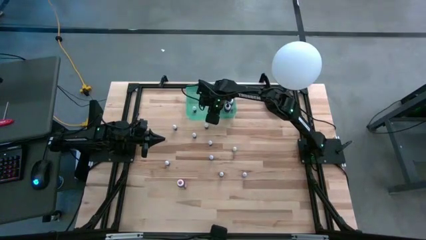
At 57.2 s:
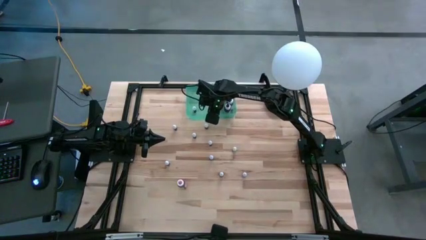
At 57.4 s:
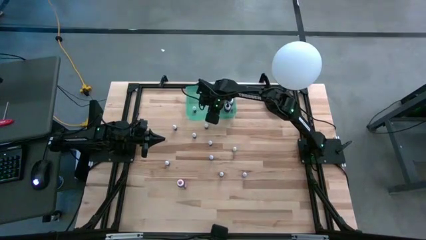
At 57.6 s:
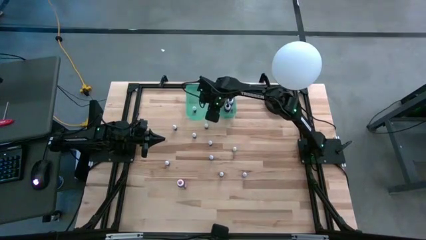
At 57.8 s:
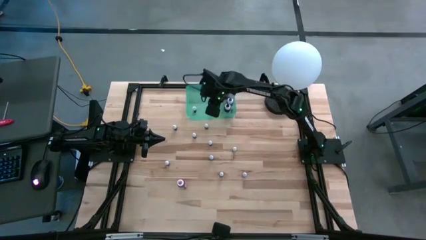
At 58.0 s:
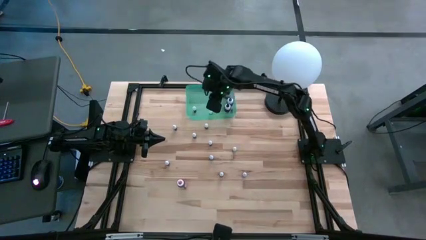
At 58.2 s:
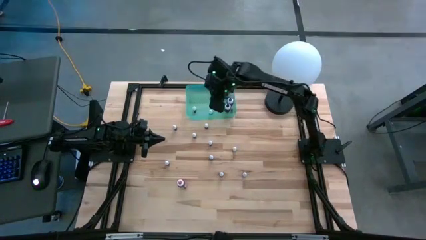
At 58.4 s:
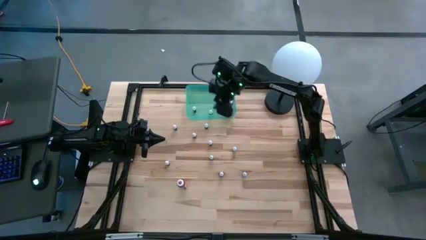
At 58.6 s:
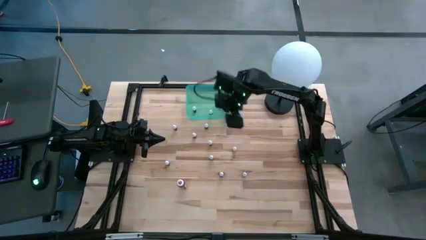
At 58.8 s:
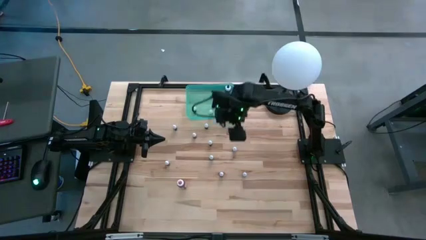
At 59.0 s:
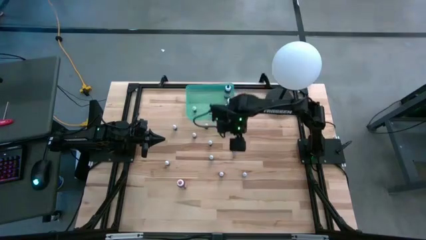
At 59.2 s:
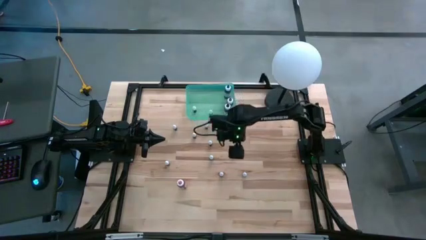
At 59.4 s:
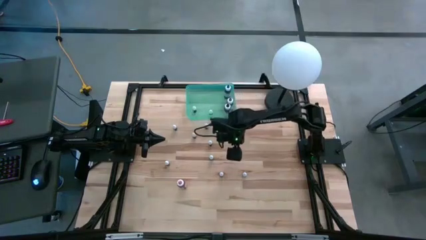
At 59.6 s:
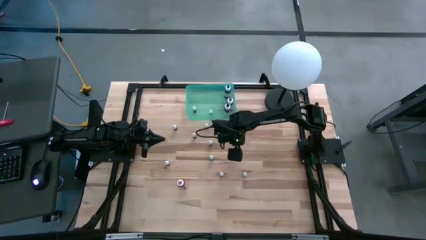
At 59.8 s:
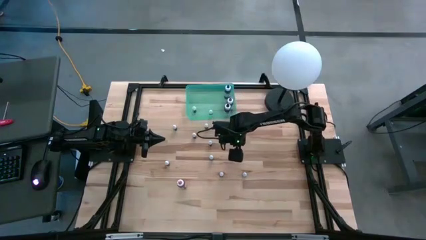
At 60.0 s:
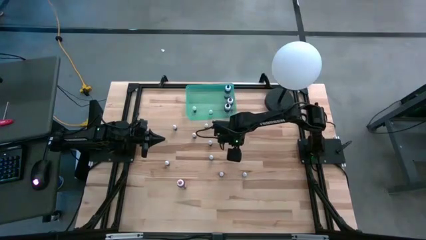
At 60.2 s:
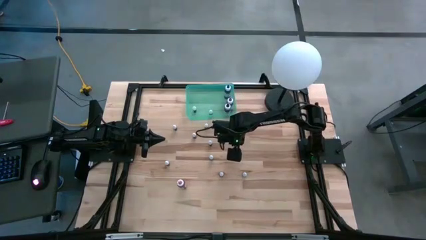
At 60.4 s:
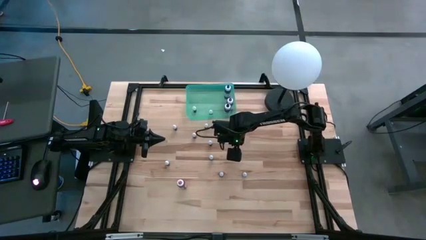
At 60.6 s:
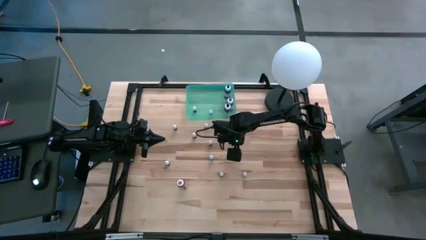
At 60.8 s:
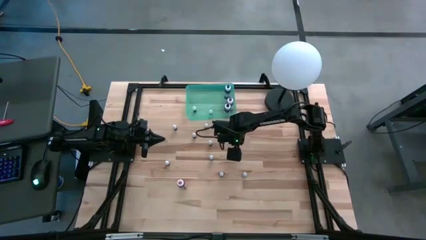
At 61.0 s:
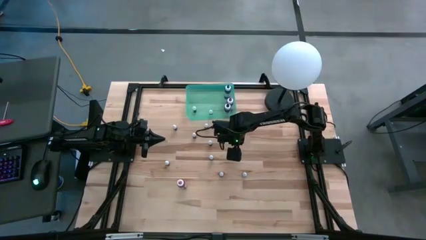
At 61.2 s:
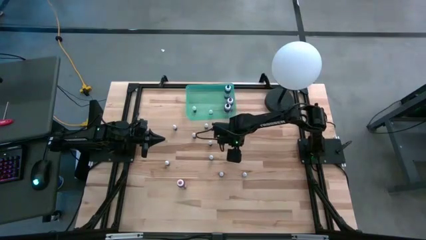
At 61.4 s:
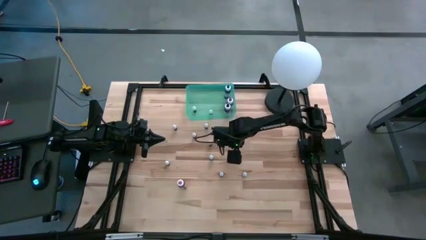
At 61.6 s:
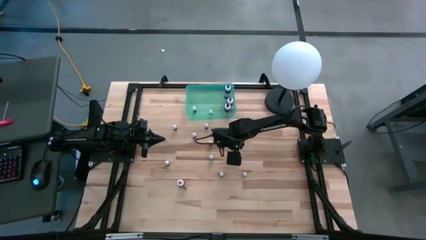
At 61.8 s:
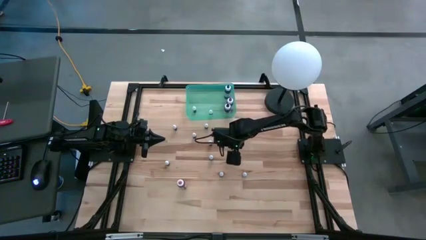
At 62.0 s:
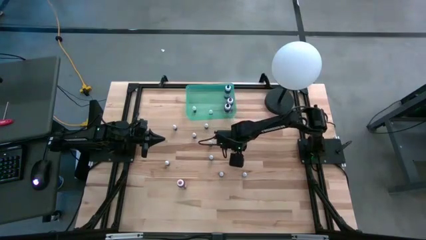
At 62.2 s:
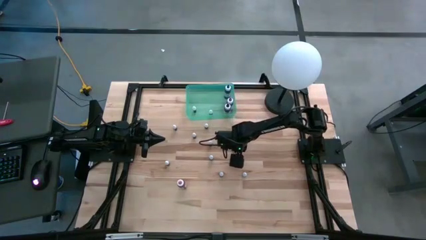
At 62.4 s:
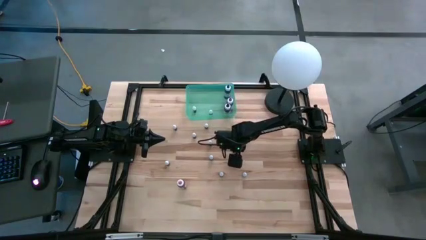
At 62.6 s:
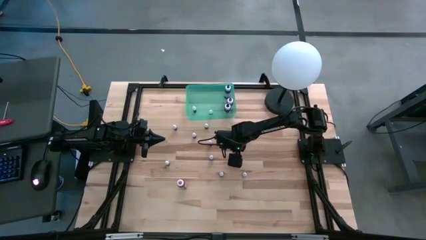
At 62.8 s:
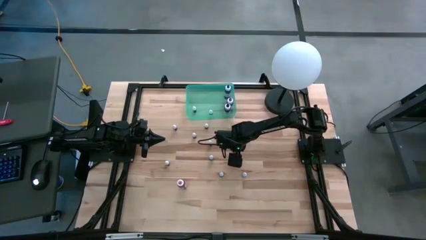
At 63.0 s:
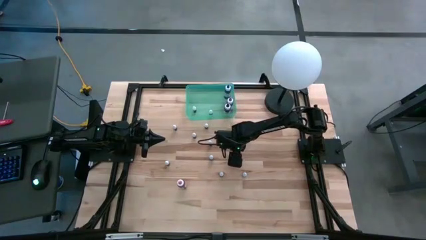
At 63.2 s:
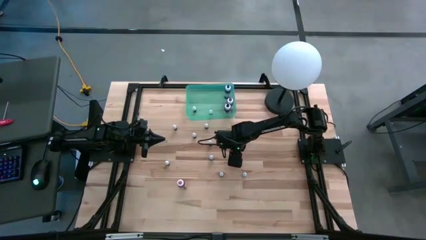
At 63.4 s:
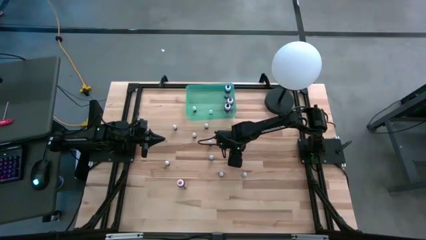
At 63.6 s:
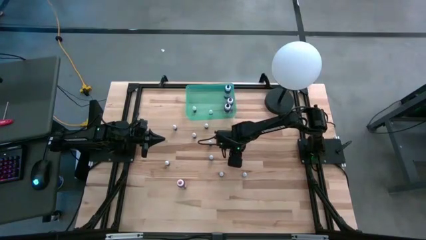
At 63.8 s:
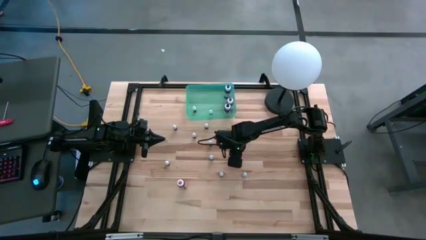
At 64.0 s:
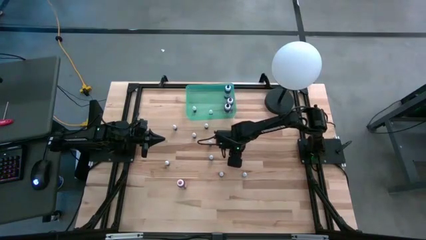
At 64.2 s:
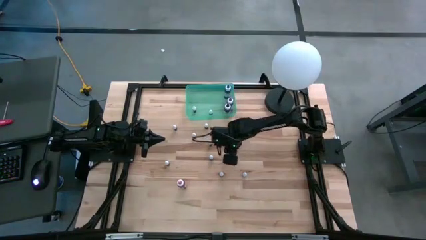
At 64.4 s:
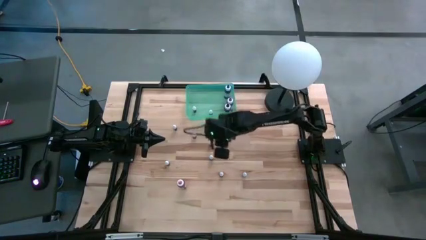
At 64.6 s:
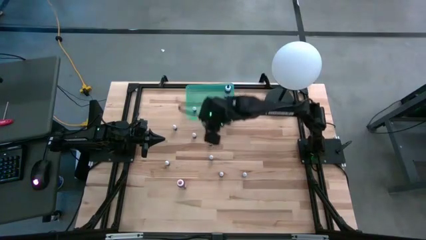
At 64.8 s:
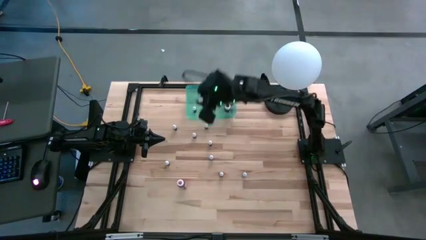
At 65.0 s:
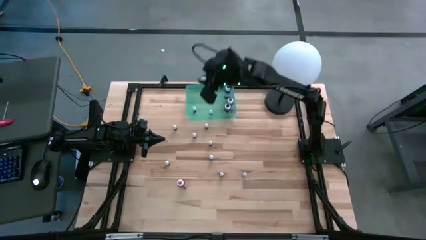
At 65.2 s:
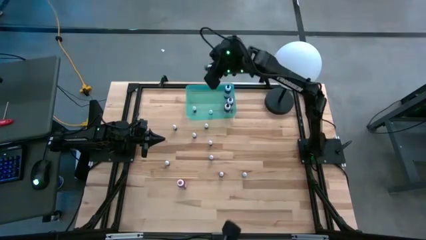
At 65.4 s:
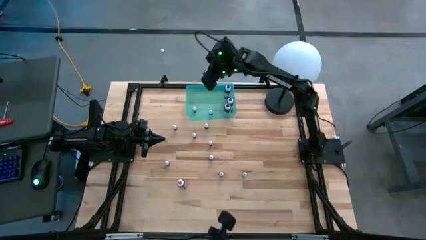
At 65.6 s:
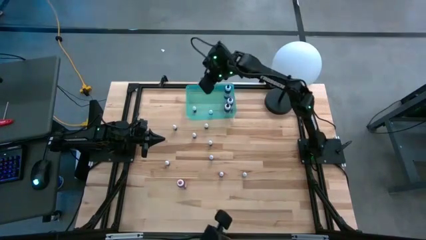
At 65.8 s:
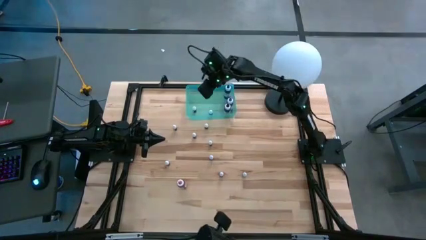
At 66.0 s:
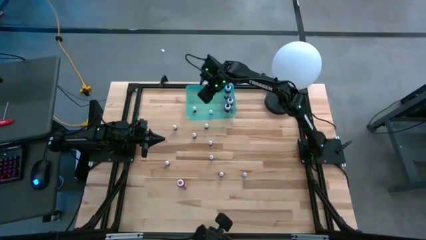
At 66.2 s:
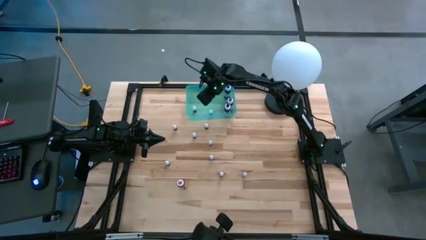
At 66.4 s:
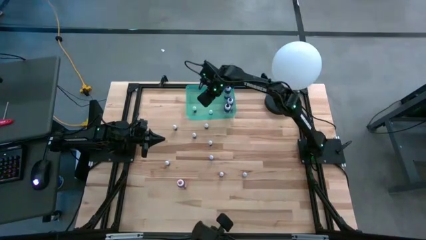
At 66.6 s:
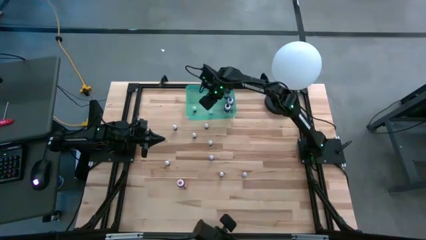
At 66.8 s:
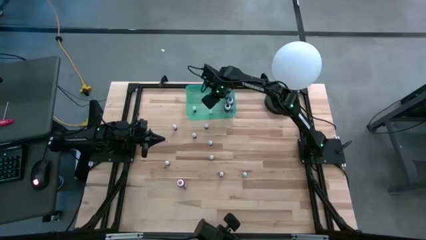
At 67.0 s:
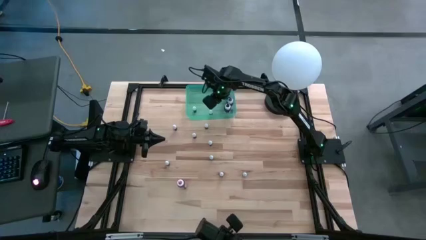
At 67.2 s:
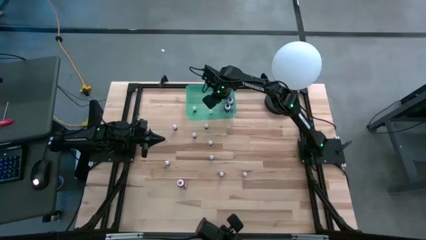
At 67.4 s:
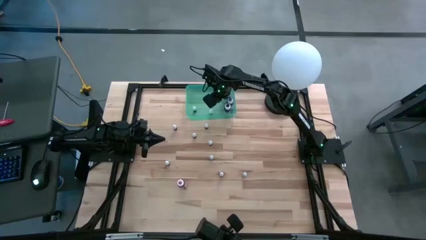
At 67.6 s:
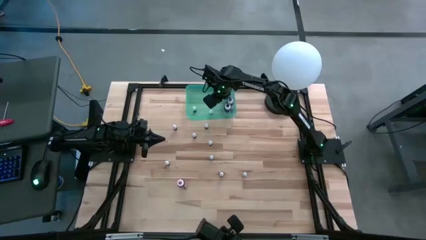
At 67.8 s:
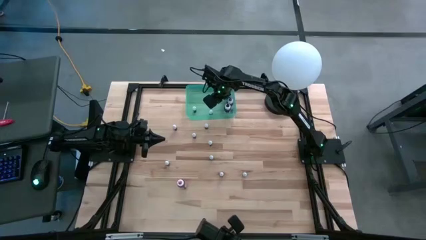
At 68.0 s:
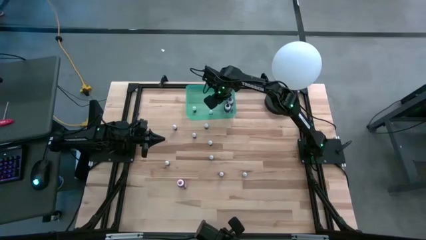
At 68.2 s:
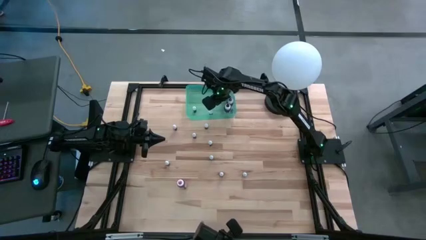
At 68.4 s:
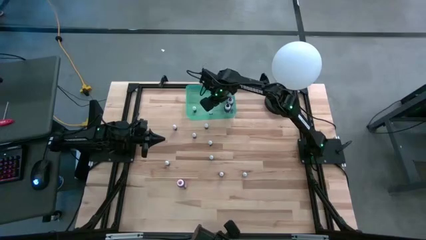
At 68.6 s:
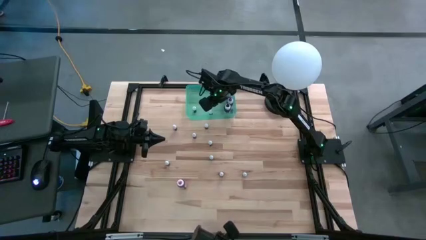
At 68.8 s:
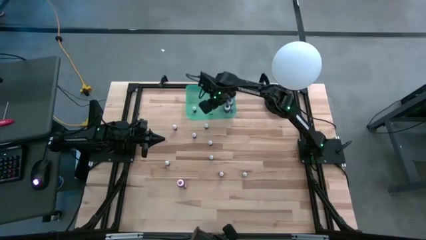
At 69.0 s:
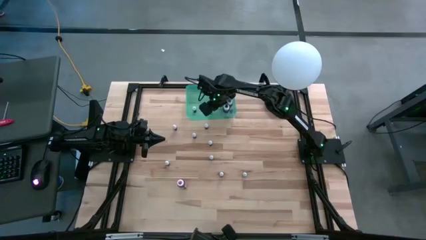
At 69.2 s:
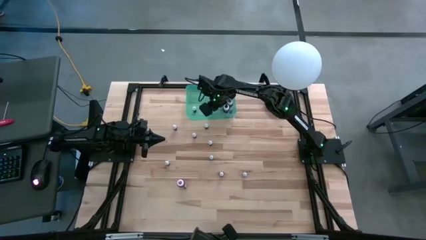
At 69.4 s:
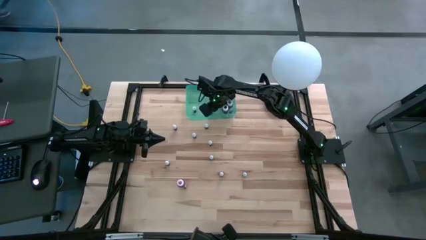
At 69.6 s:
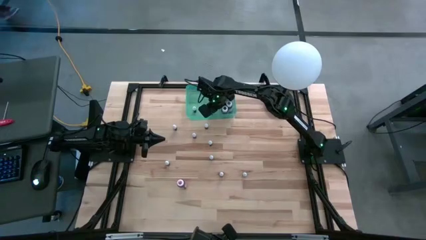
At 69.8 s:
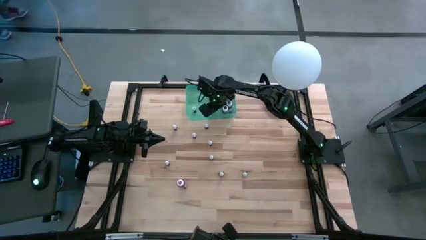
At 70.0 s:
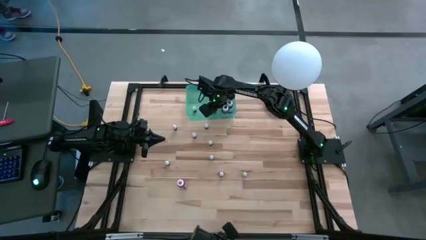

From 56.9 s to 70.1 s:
Task: Pick & Place food coloring
Put the small green food coloring into the bin
